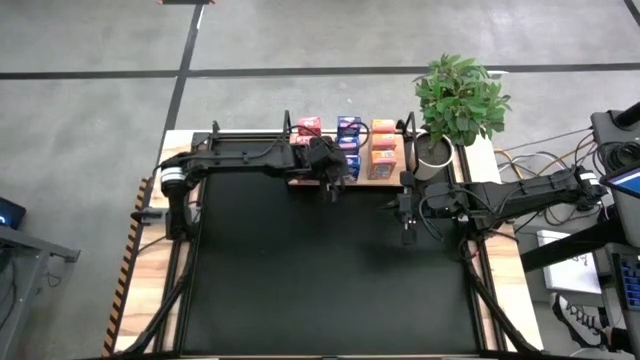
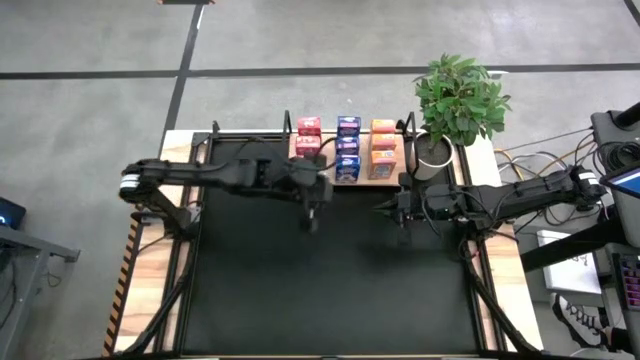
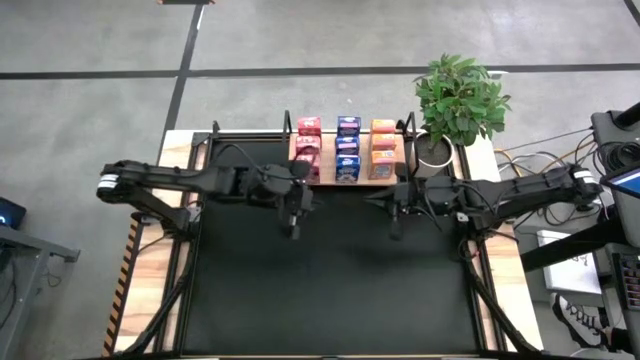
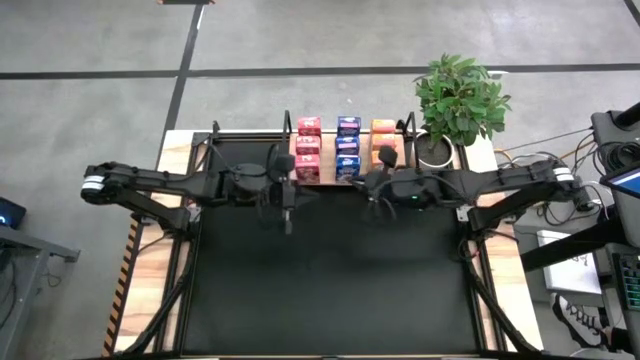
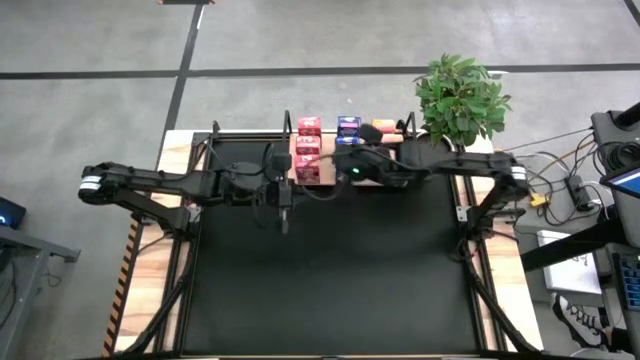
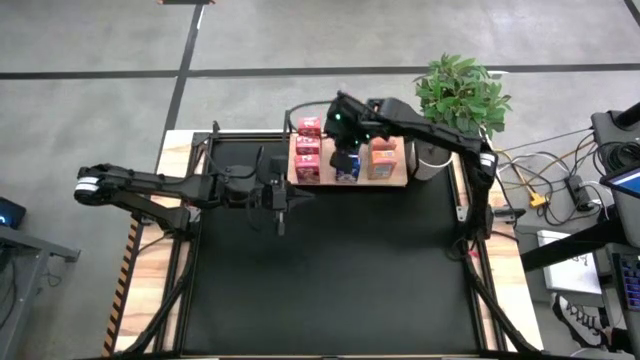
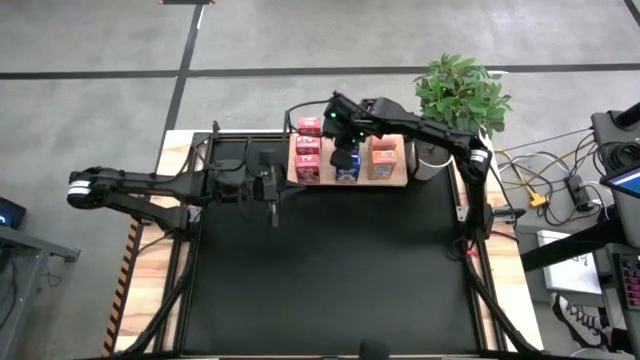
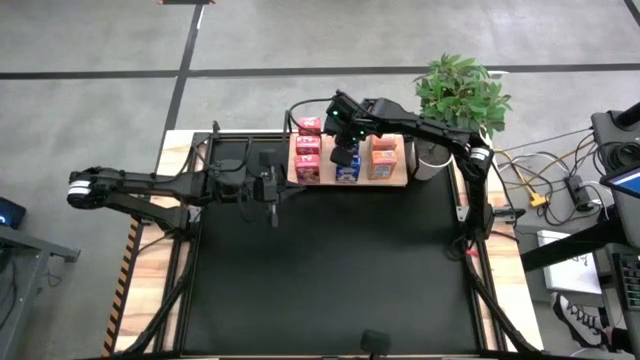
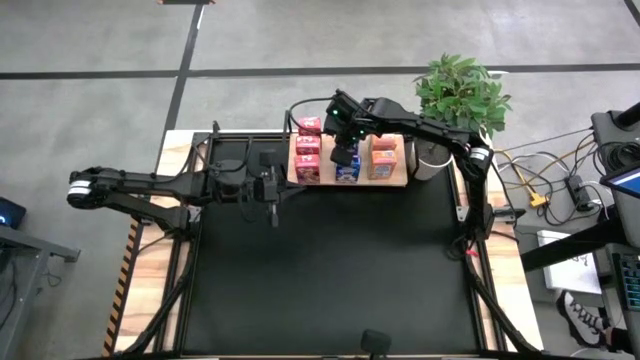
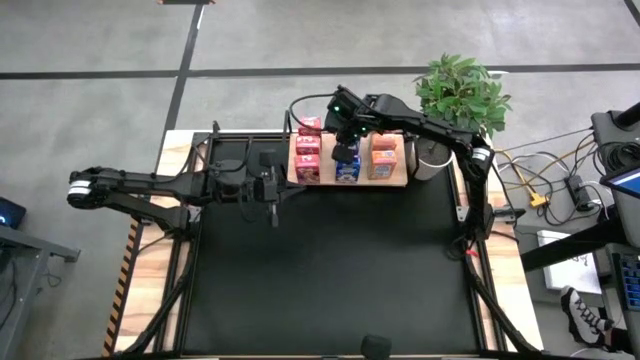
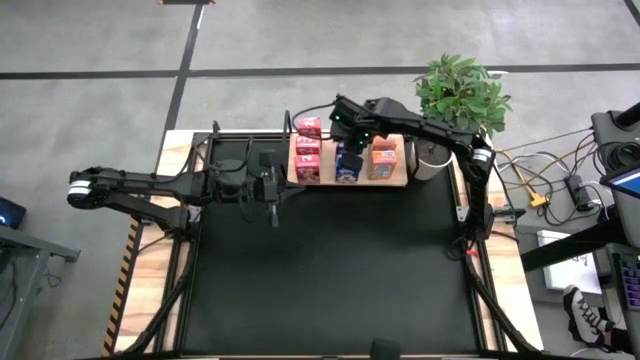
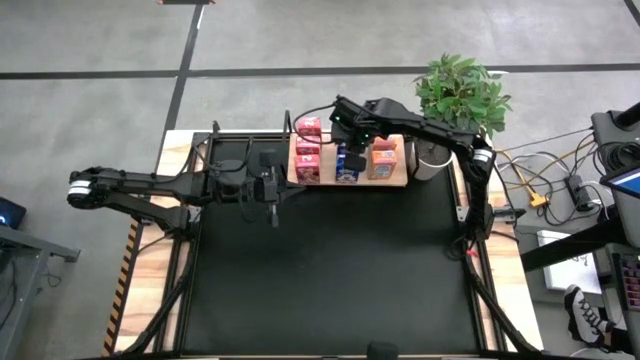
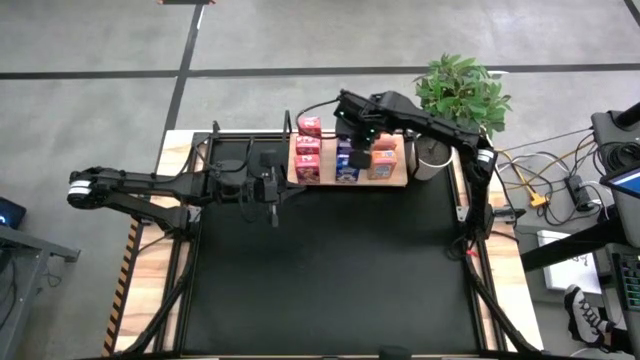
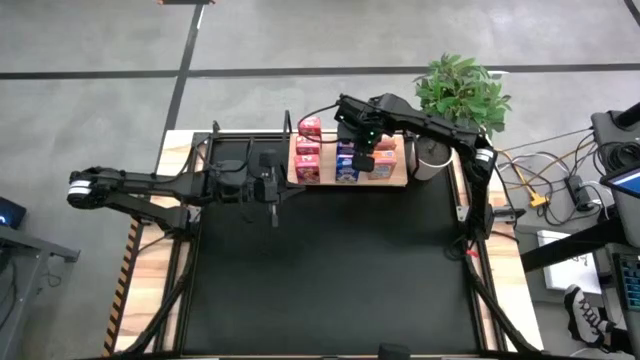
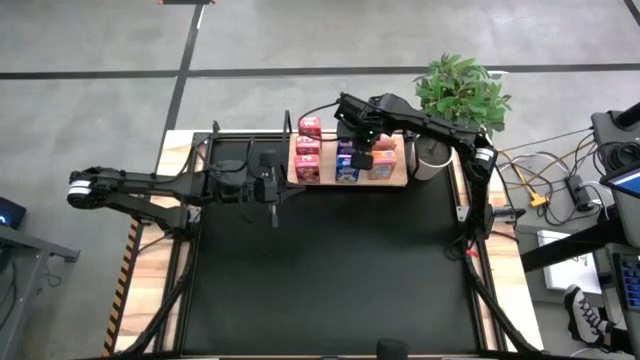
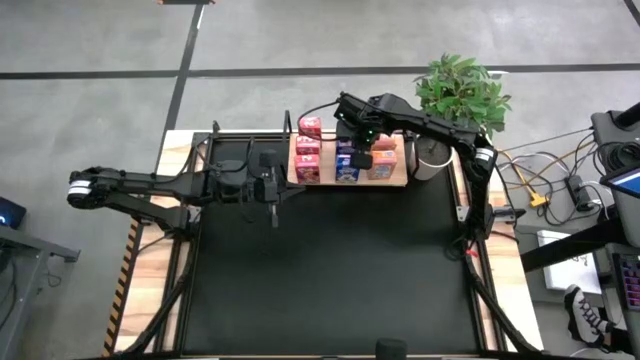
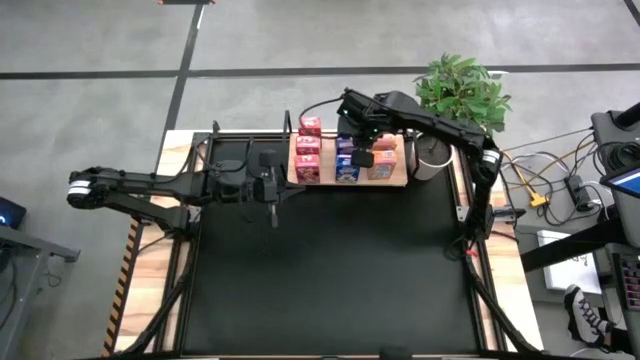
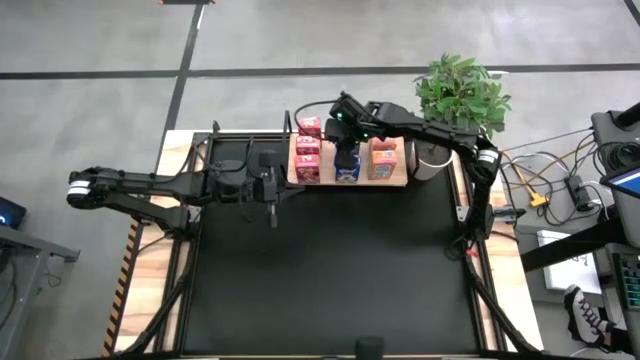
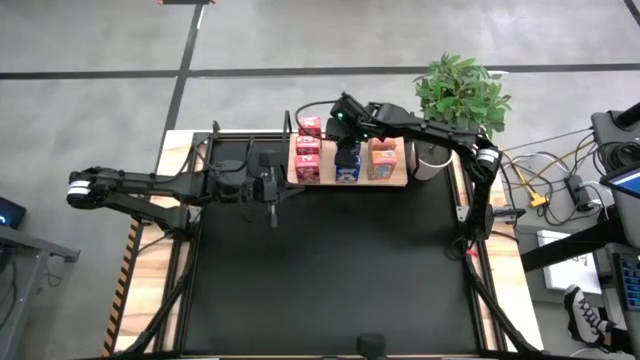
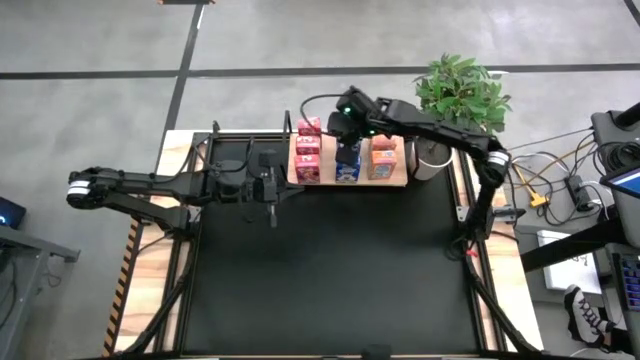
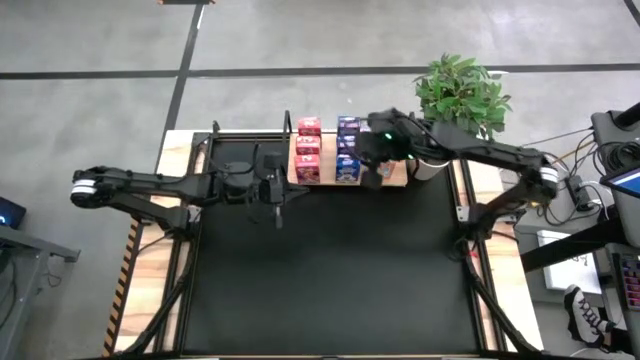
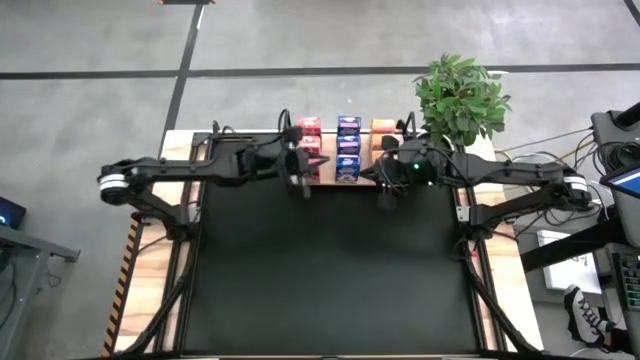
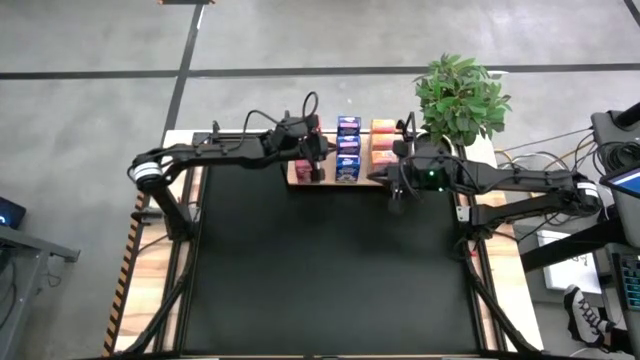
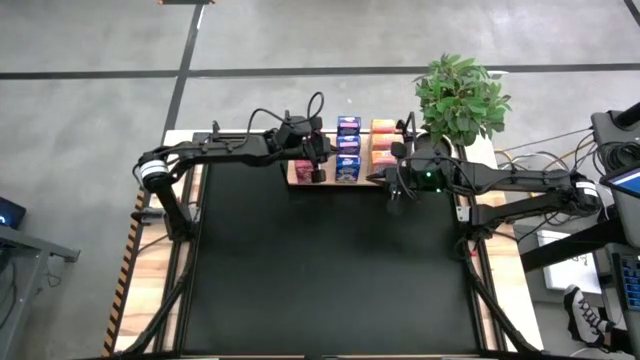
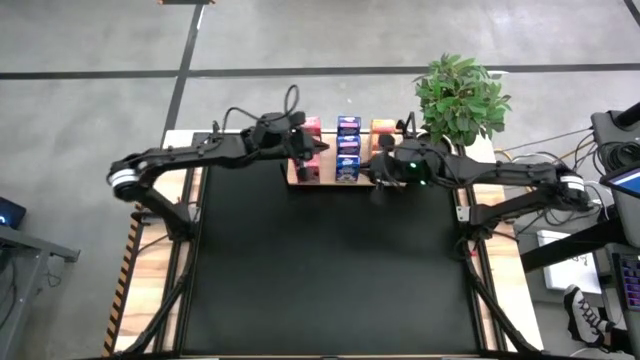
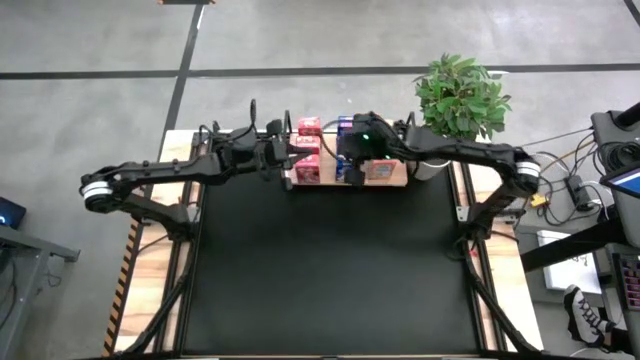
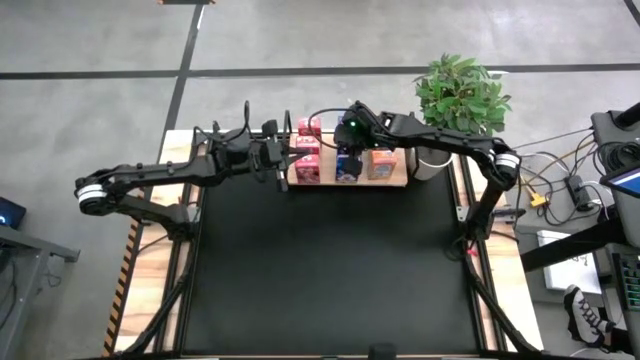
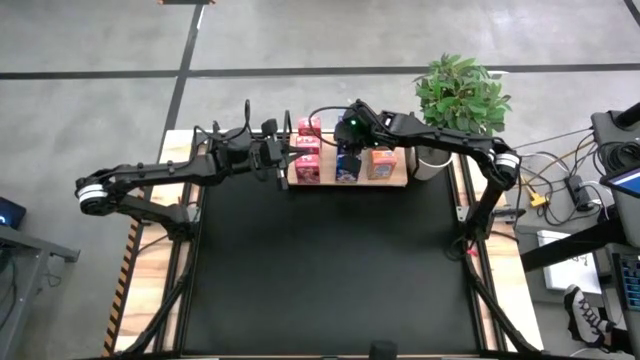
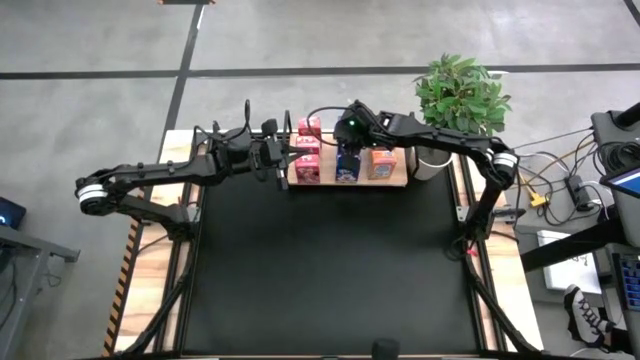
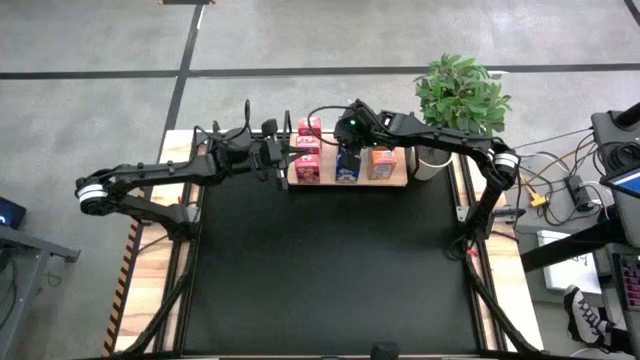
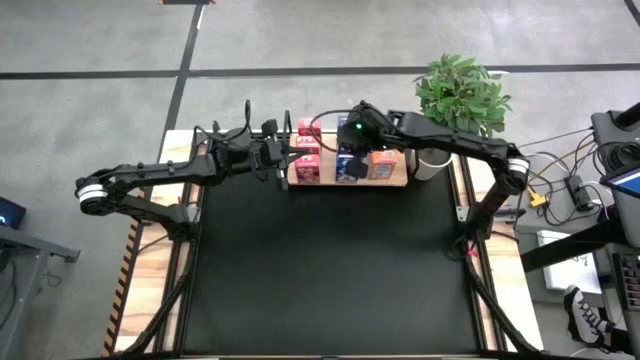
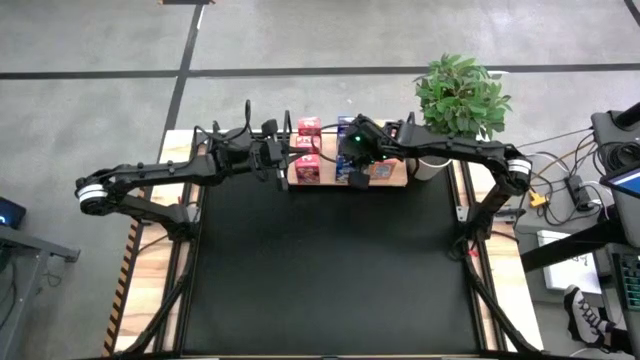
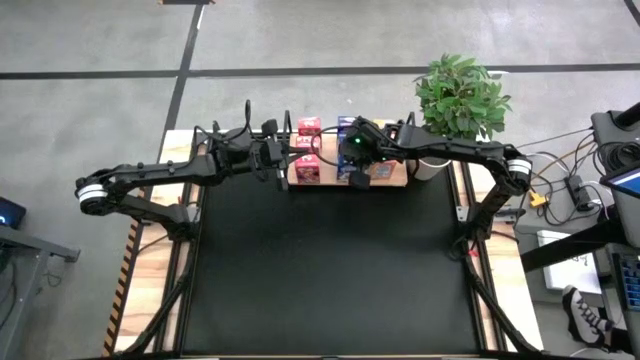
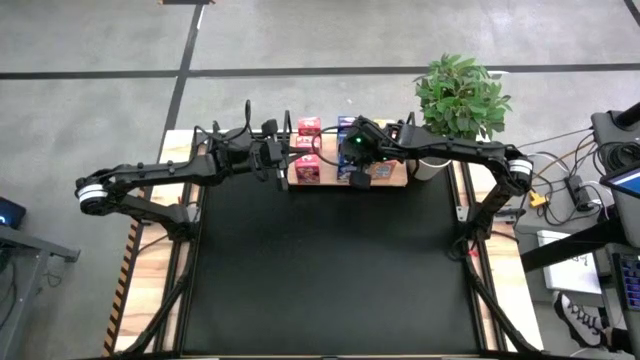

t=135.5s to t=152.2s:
Task: Stack cereal on shelf
Adjust the blue cereal boxes

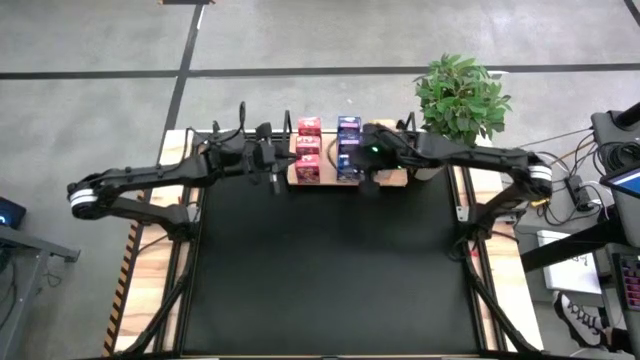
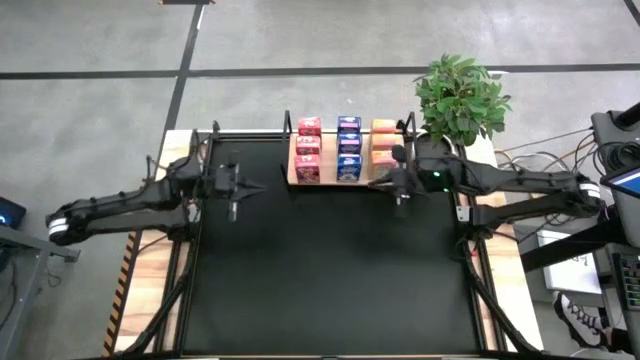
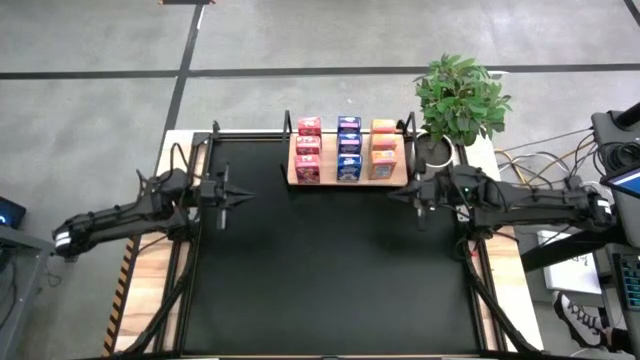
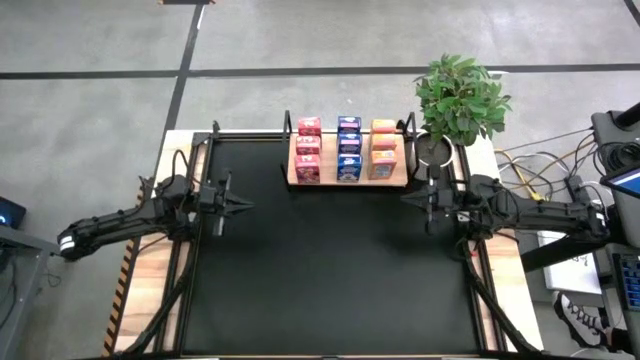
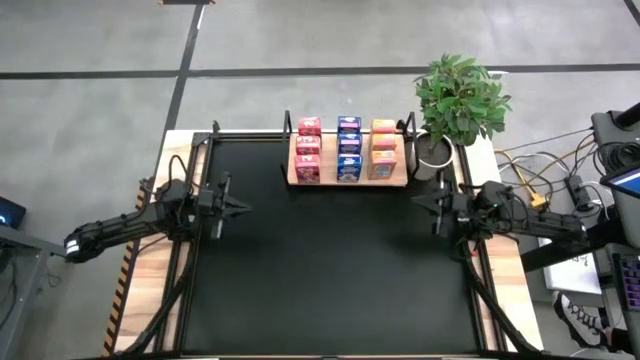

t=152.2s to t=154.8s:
Return to Home Position

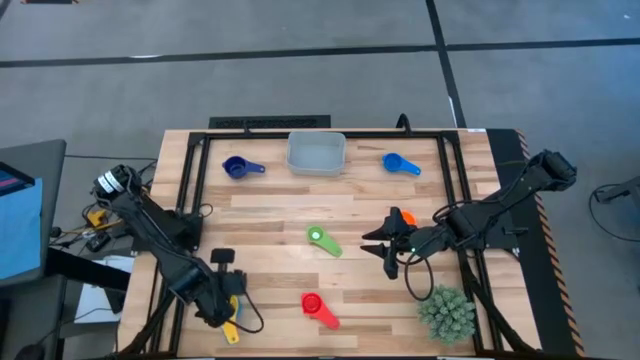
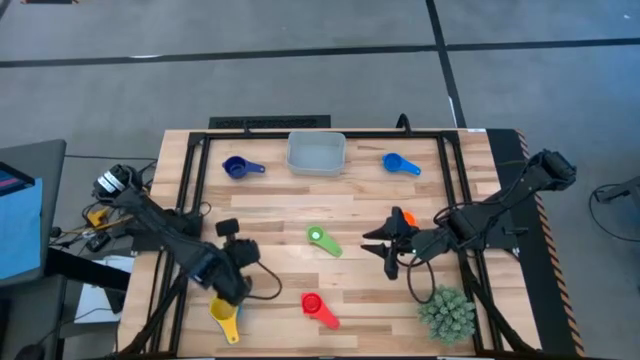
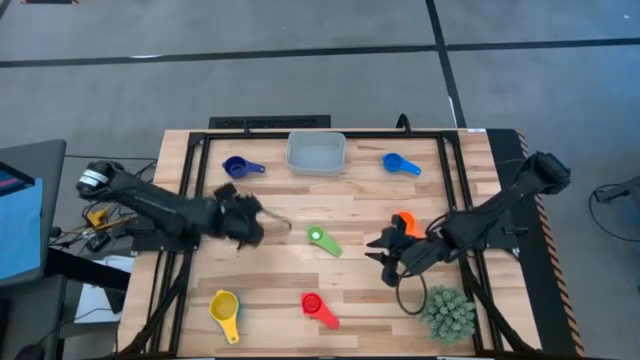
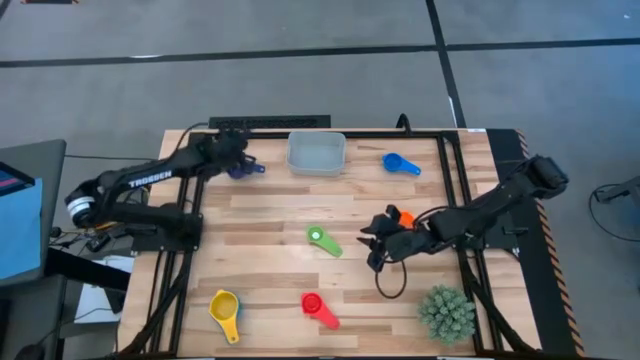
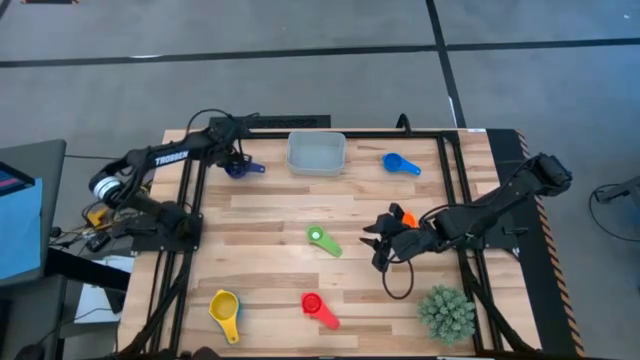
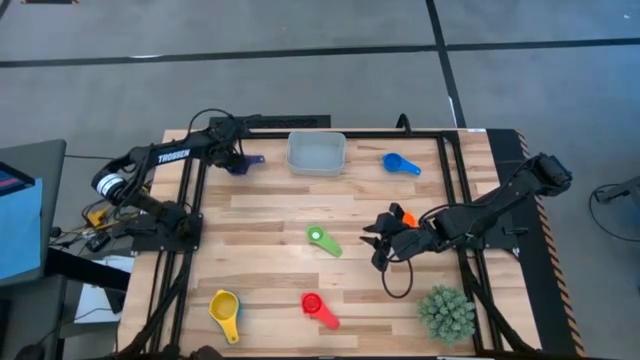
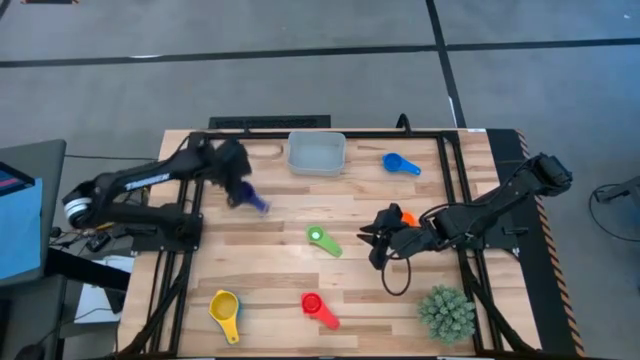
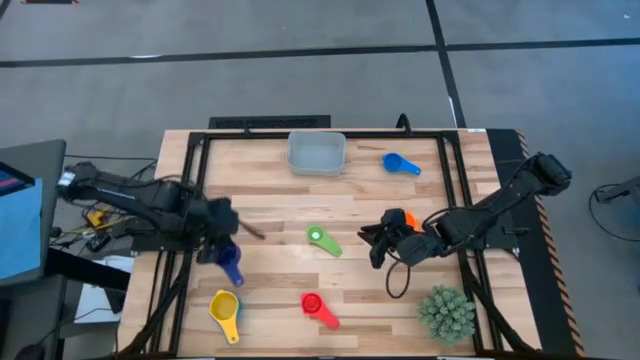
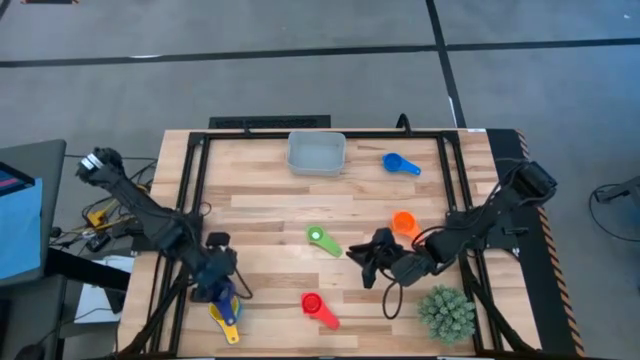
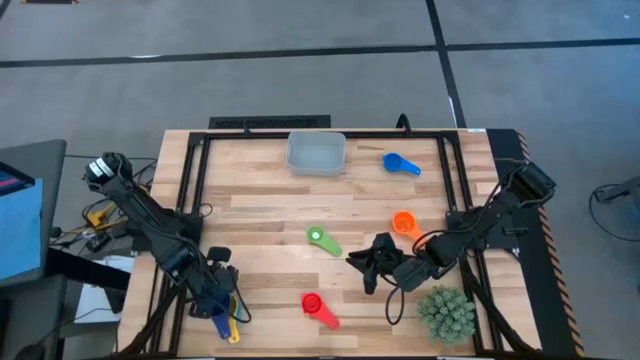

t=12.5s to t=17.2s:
Task: Nest measuring cups in basket
Stack the dark blue measuring cup on top of the yellow measuring cup
